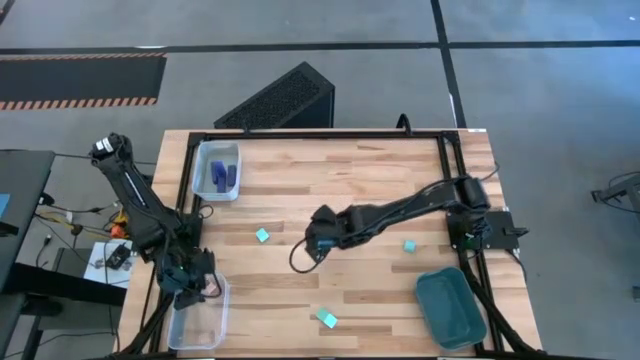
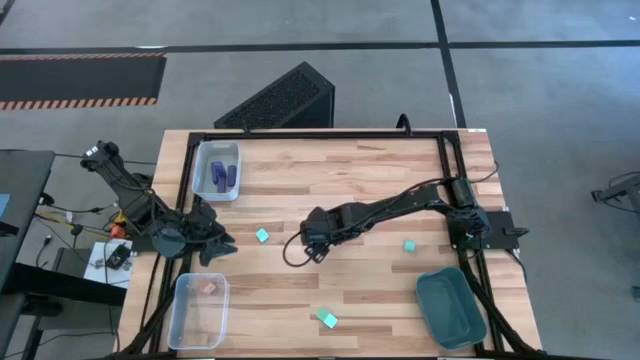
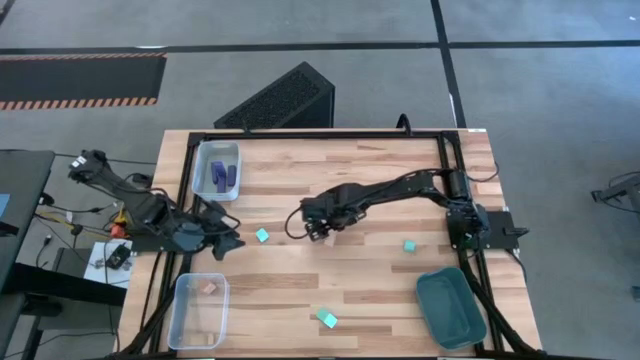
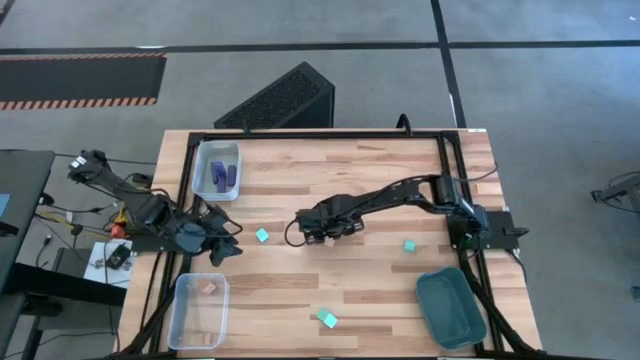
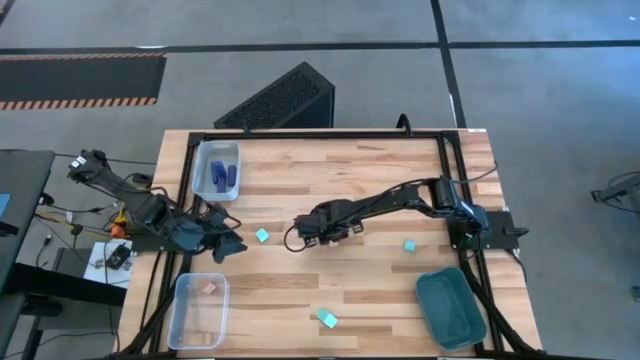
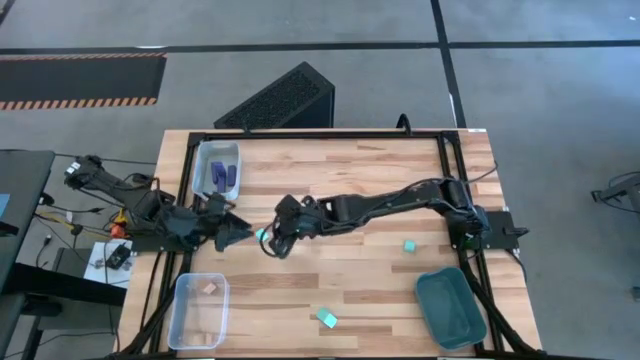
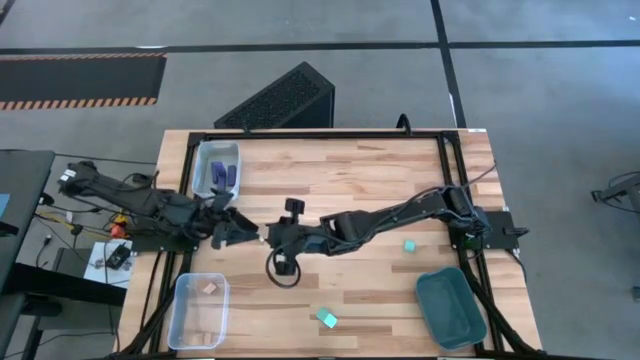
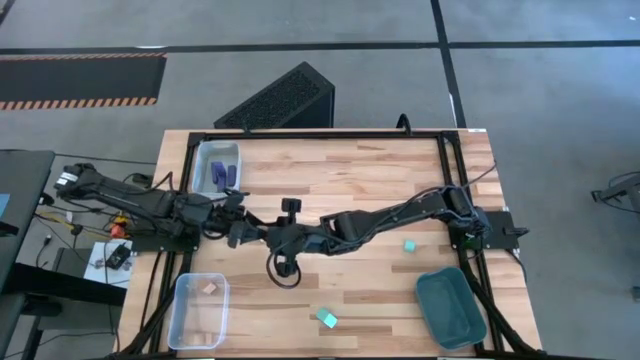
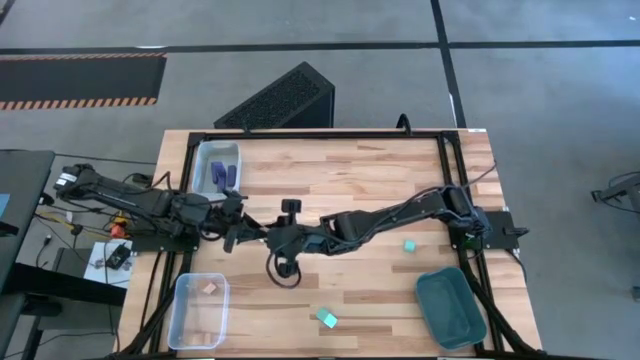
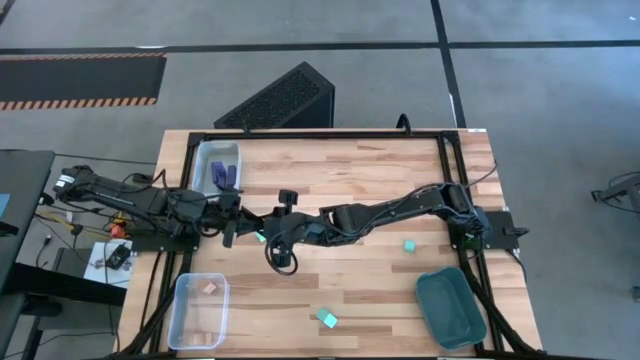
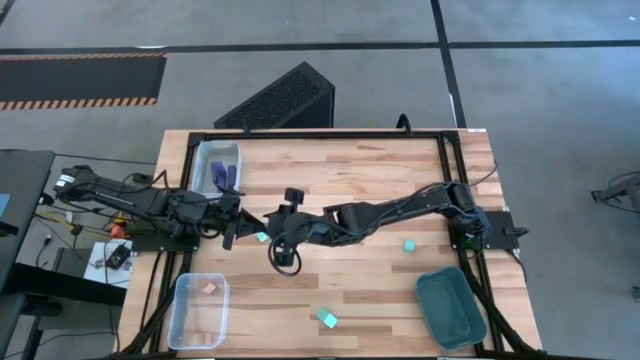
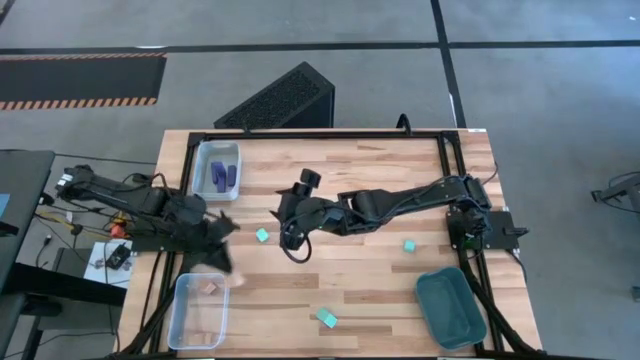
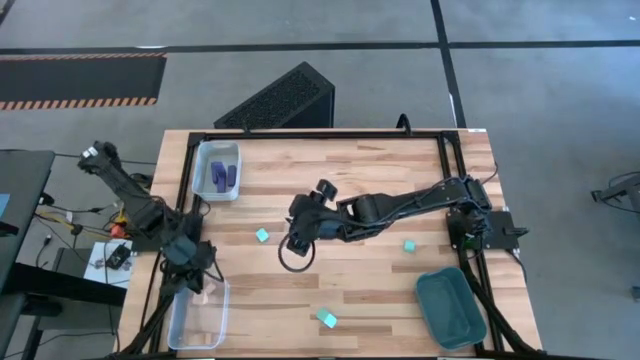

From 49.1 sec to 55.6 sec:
Task: Sort & place blocks by color
Put the brown block into the transparent bin

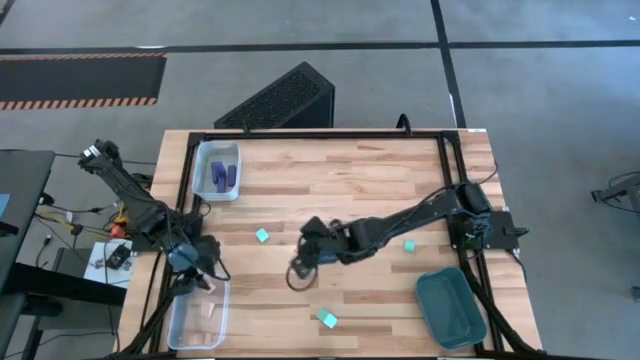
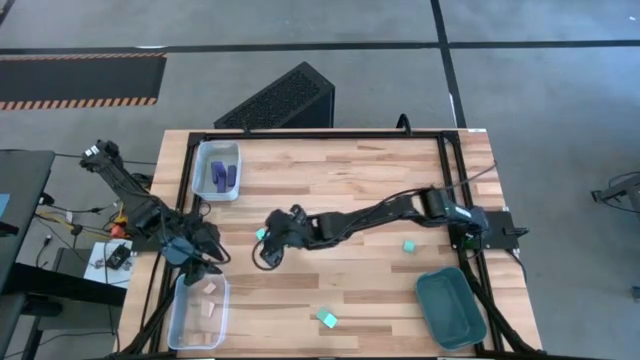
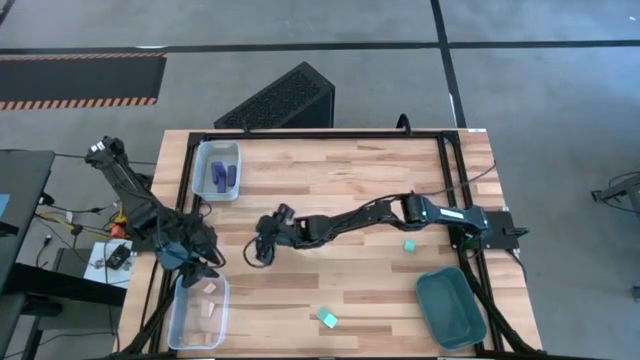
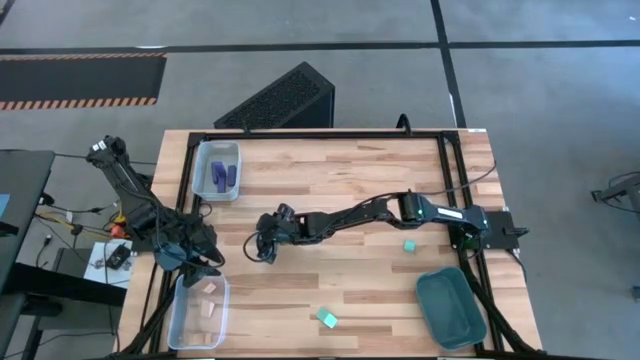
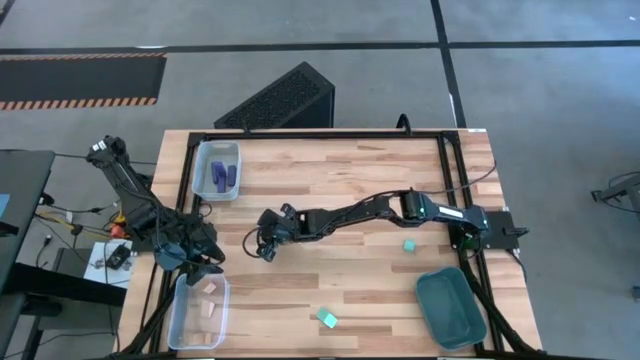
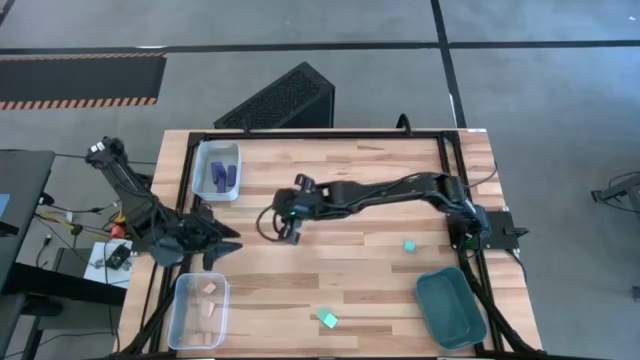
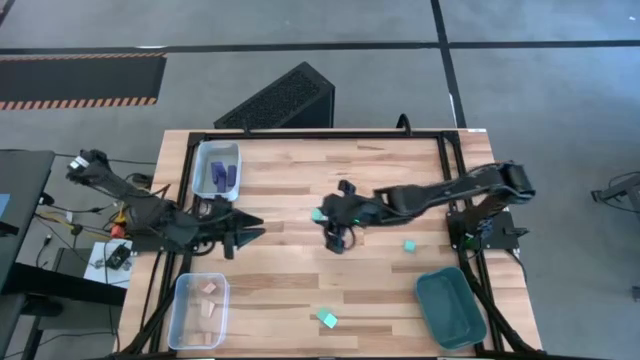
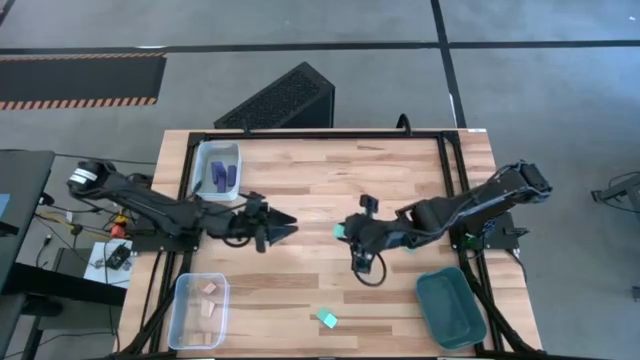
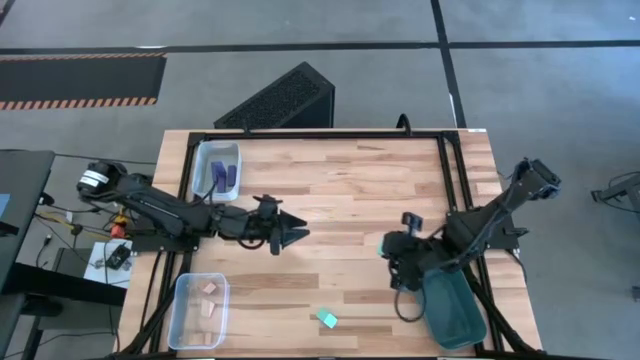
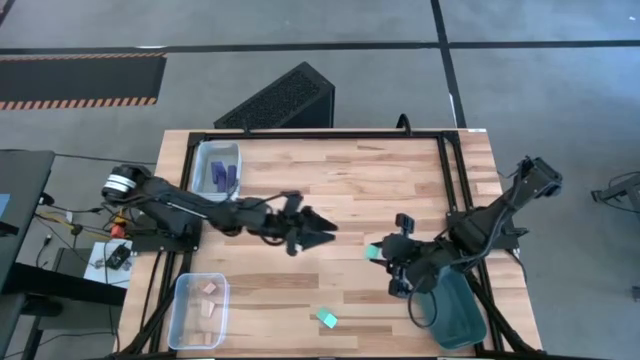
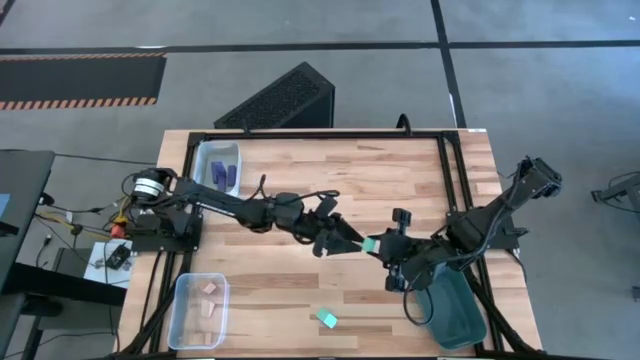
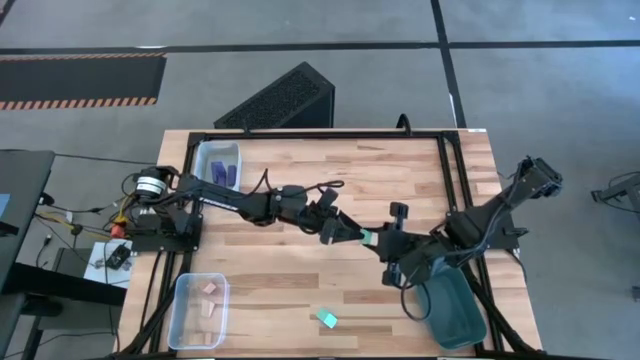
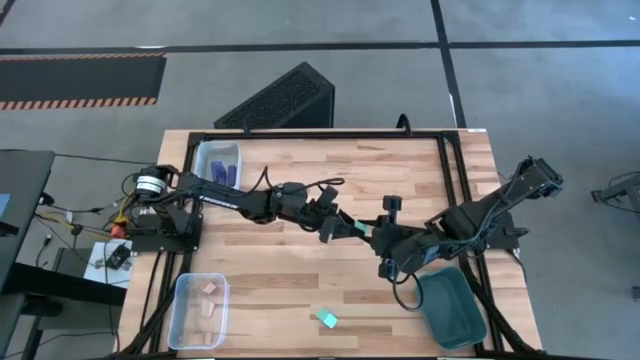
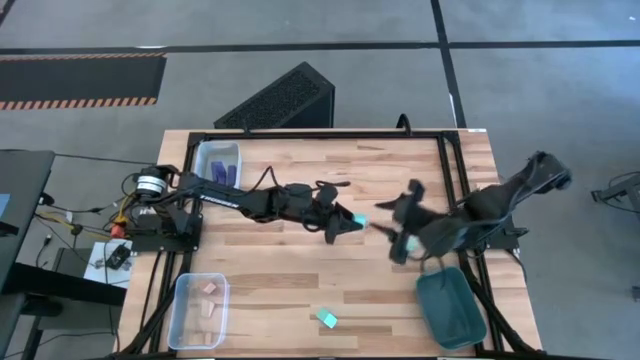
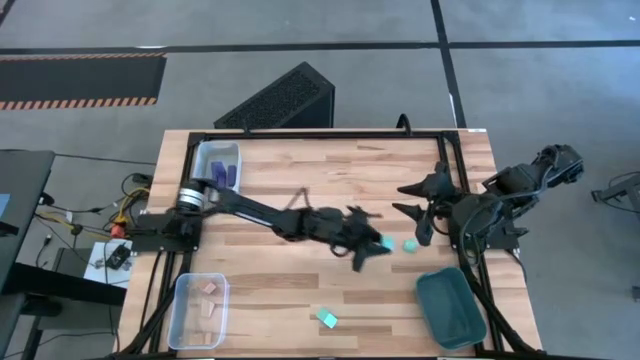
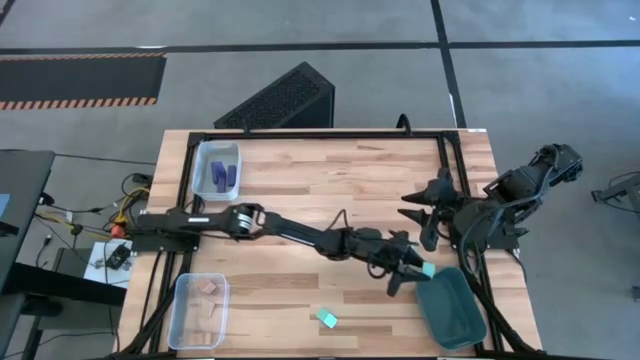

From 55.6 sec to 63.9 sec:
Put the top left blue block into the green bin

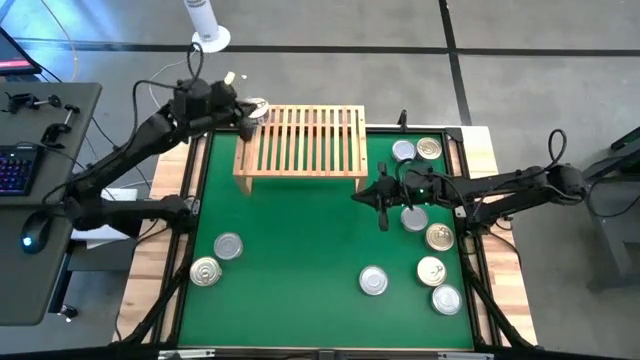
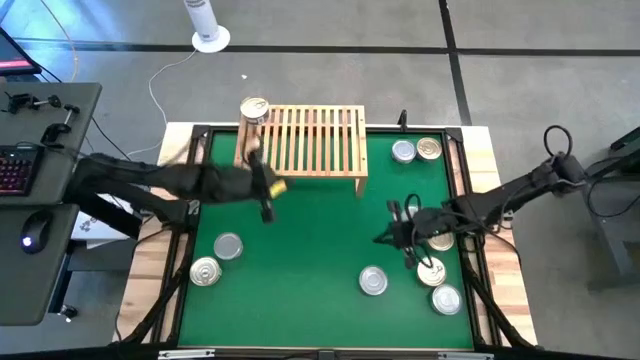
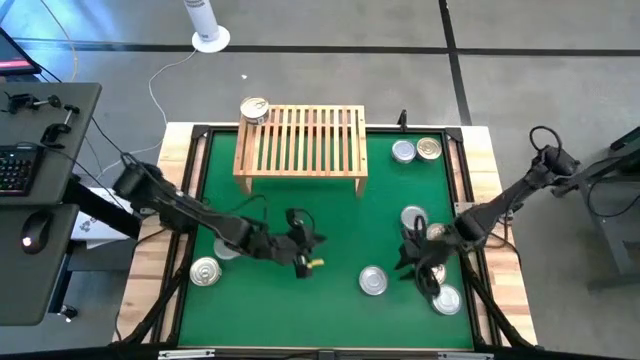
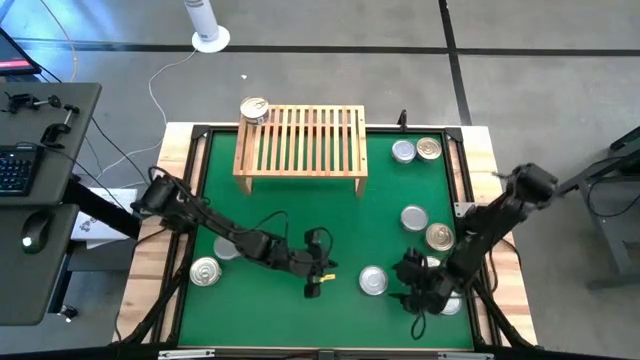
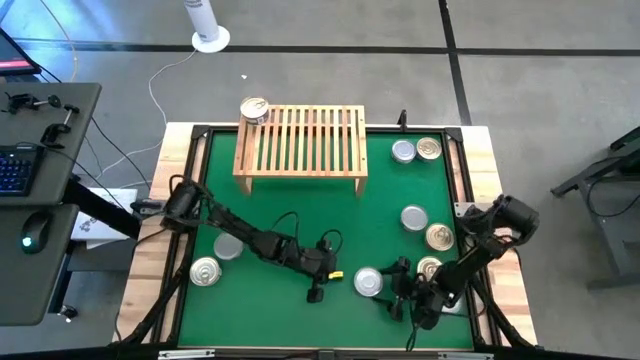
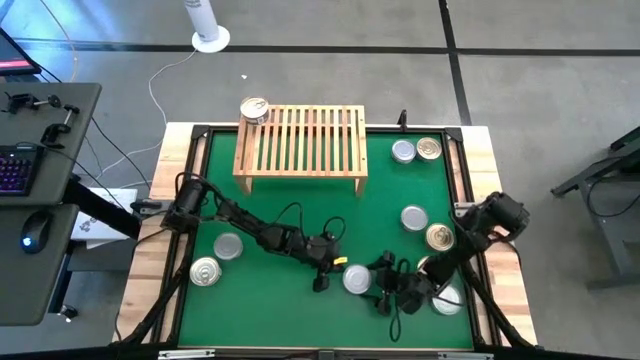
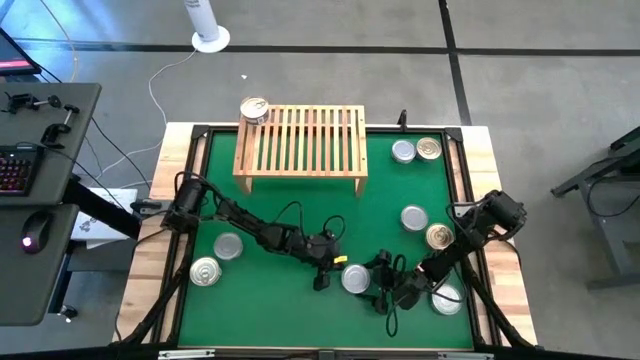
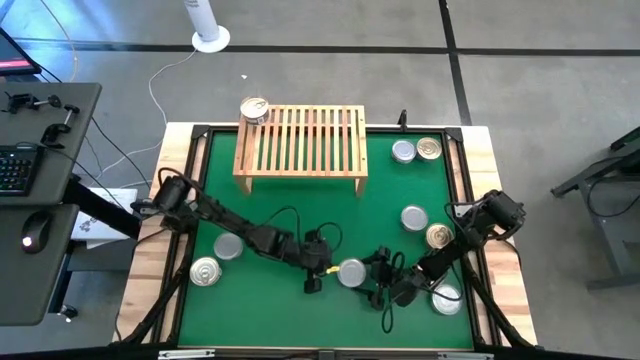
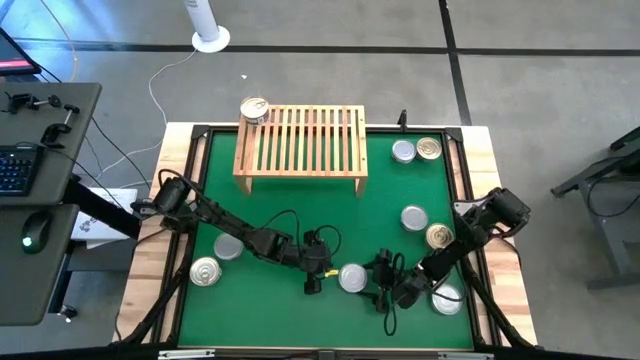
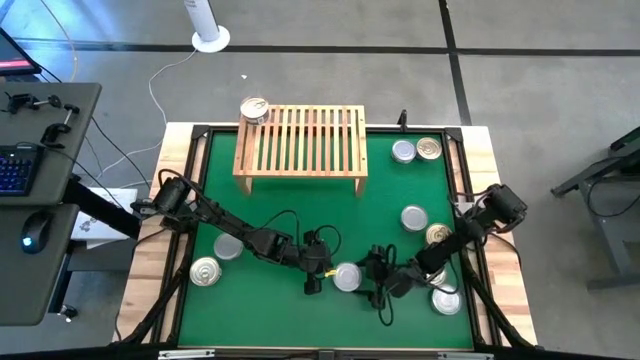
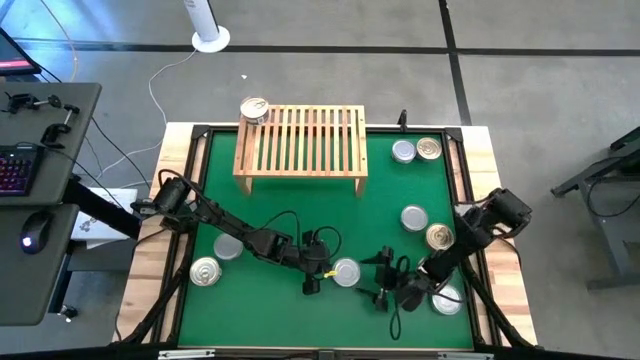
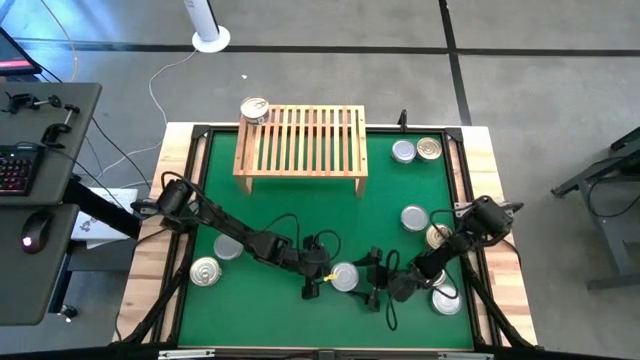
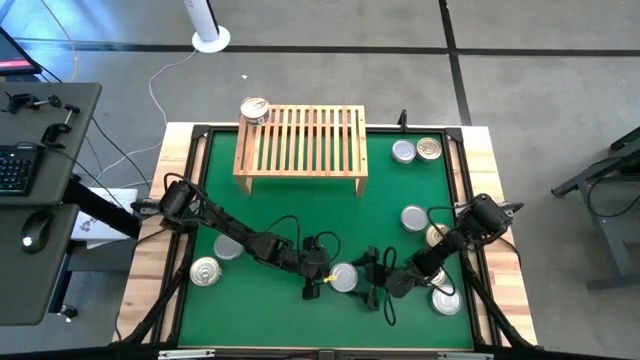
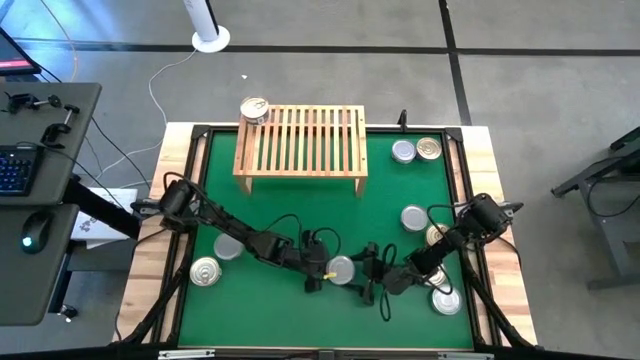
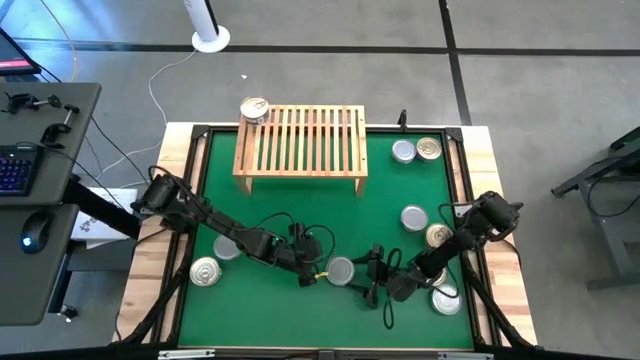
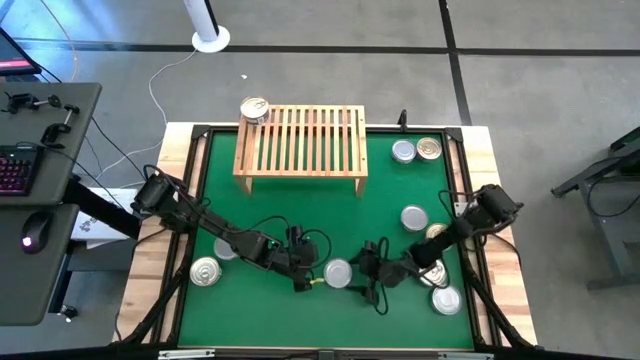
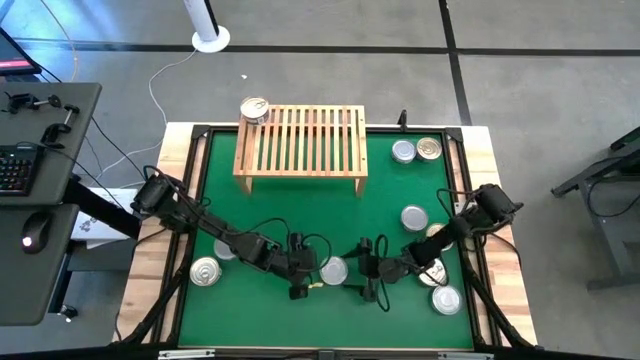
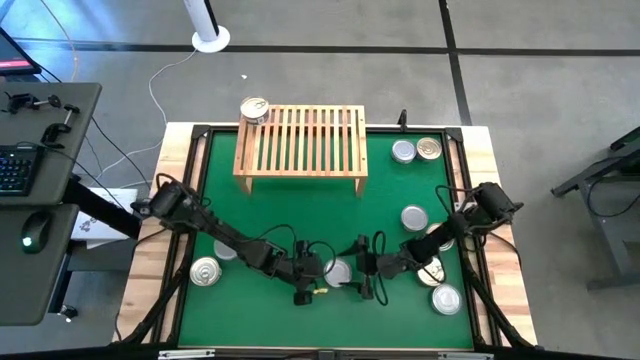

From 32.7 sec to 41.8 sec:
Task: Stack canned seafood by type on shelf
Put the green white tuna can on the shelf
